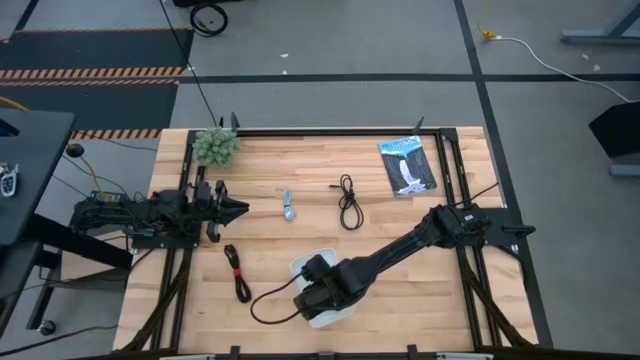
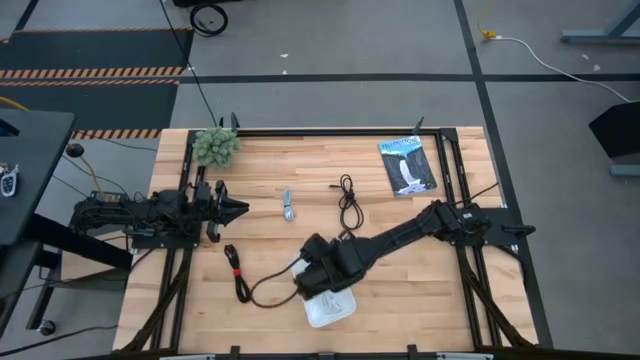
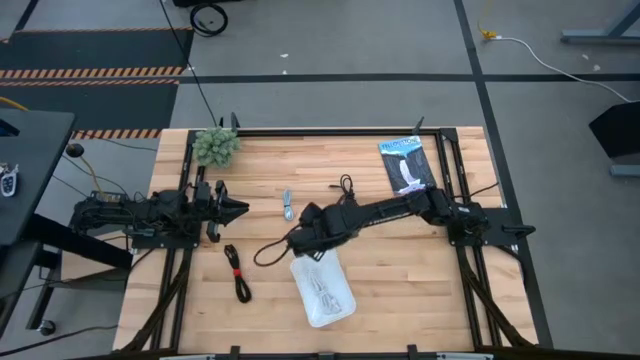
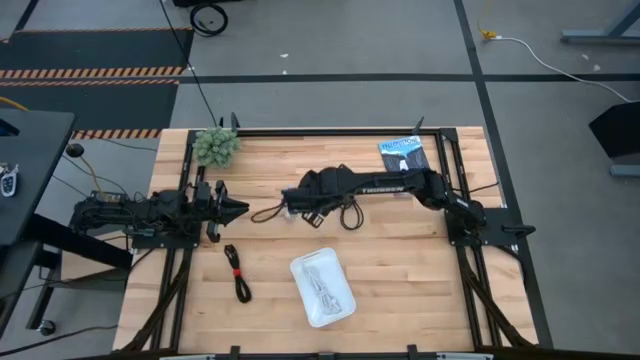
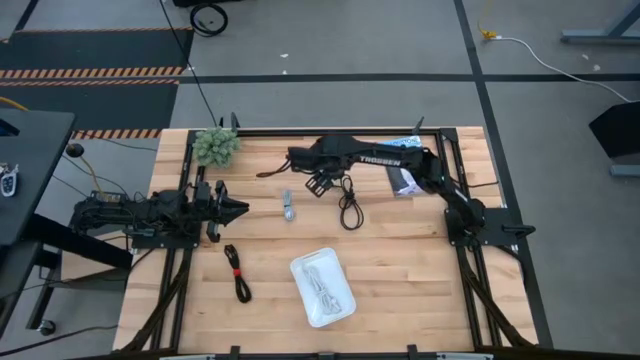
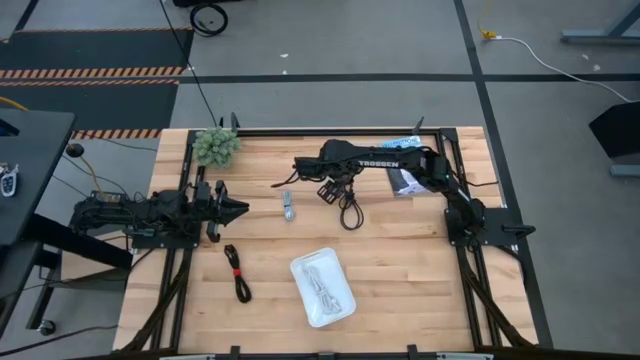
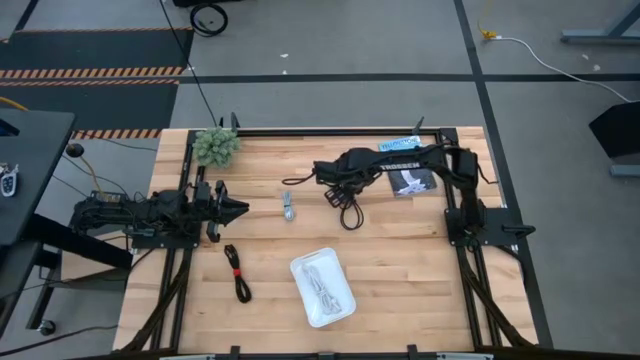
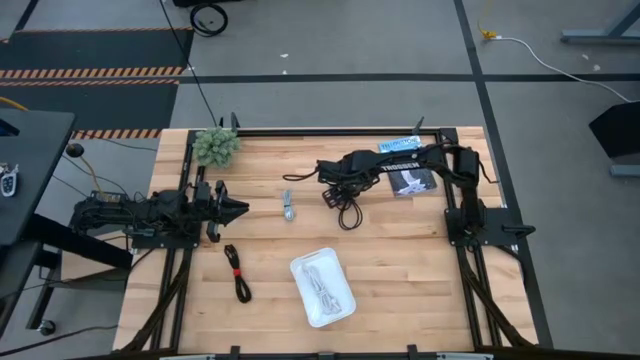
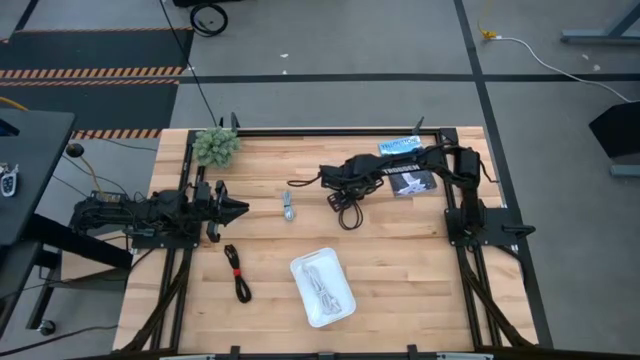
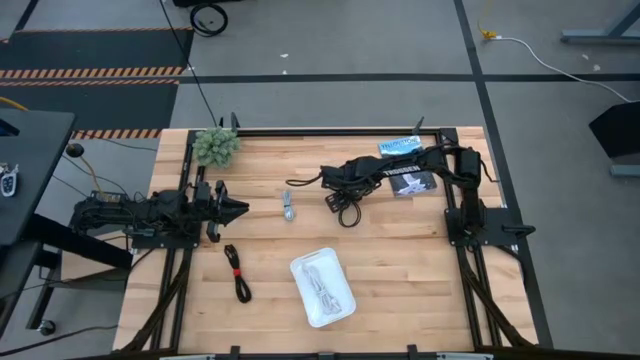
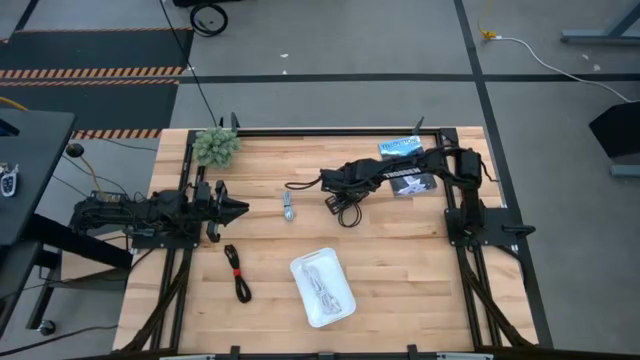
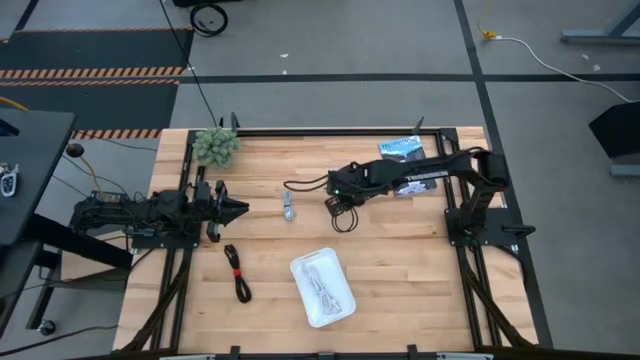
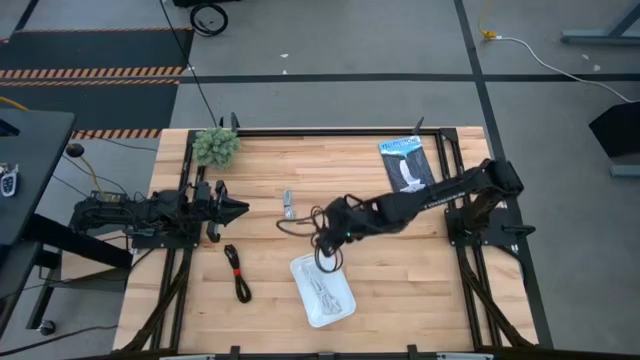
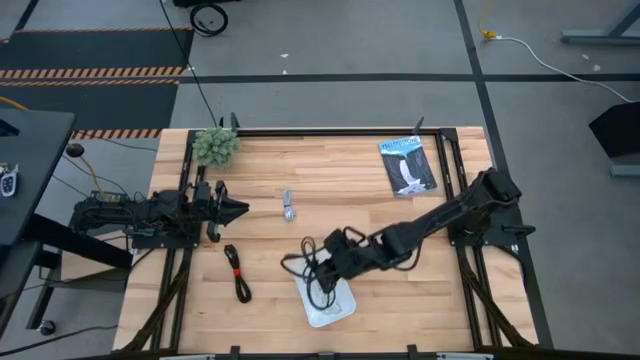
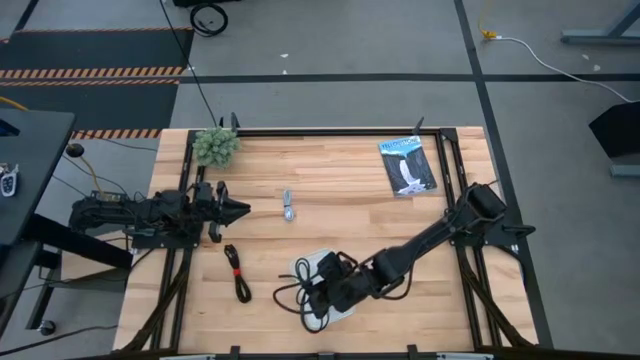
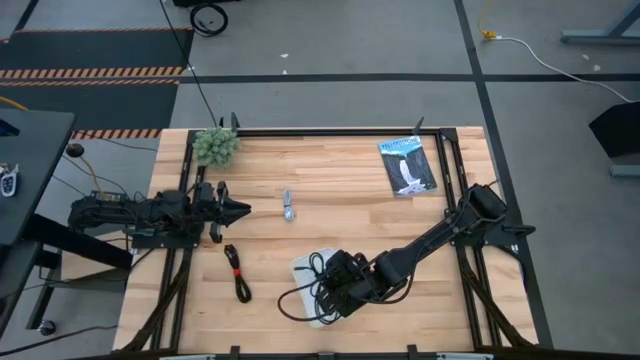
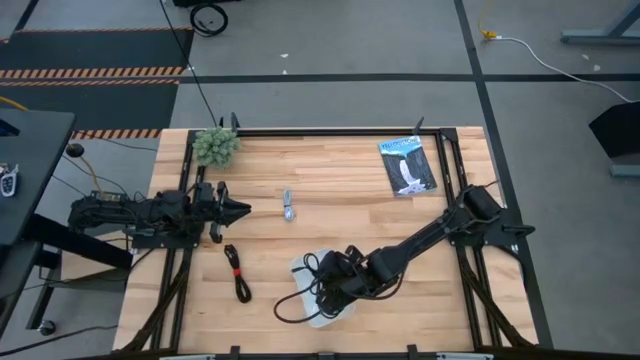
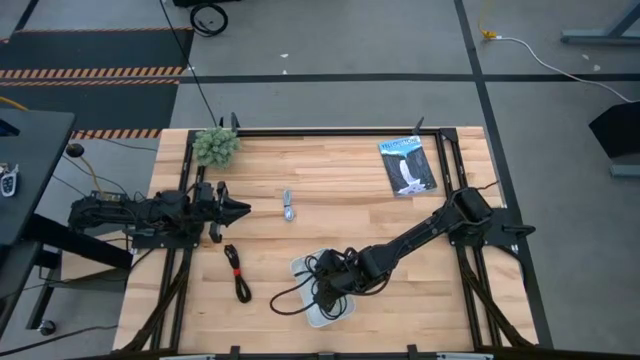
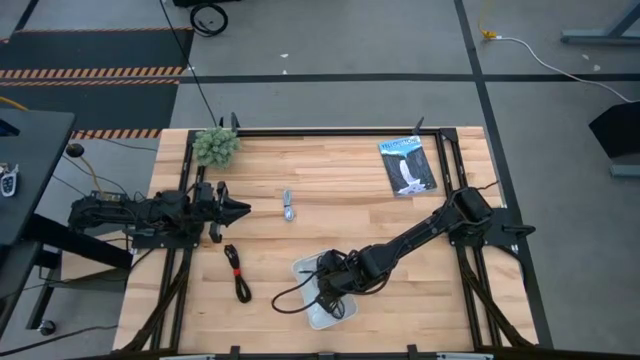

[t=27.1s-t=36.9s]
Task: Pick and place USB-C Cables
Put the right black charger cable into the white bin

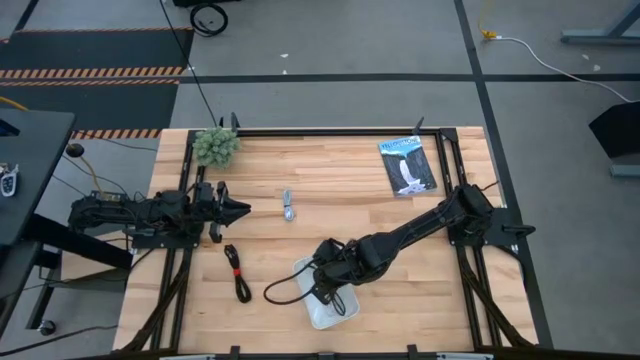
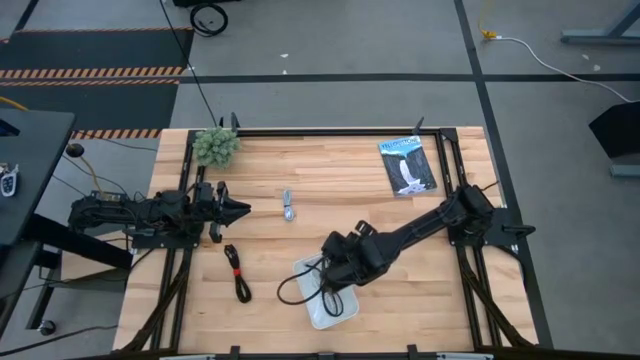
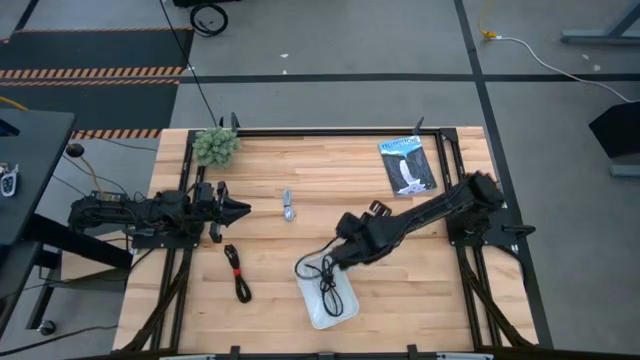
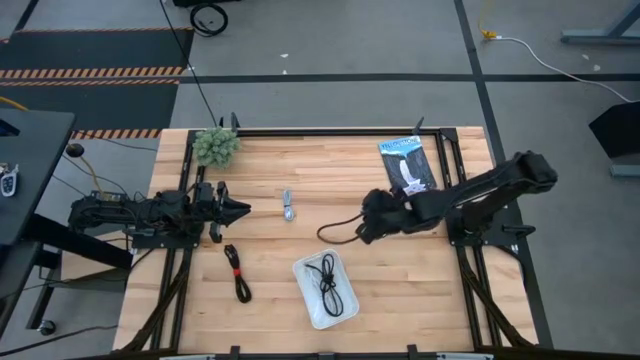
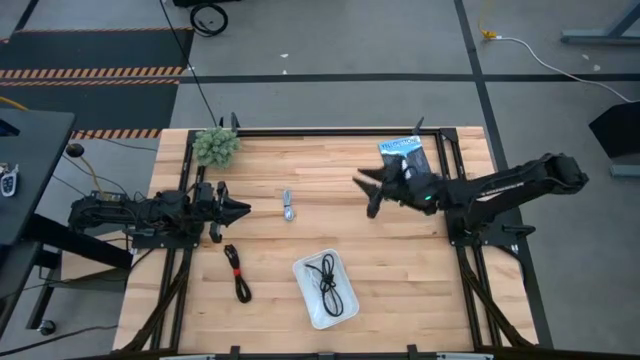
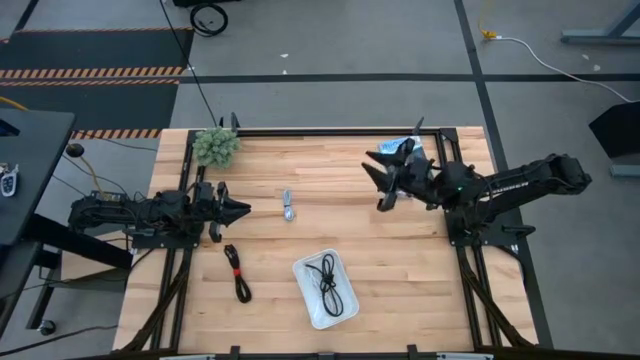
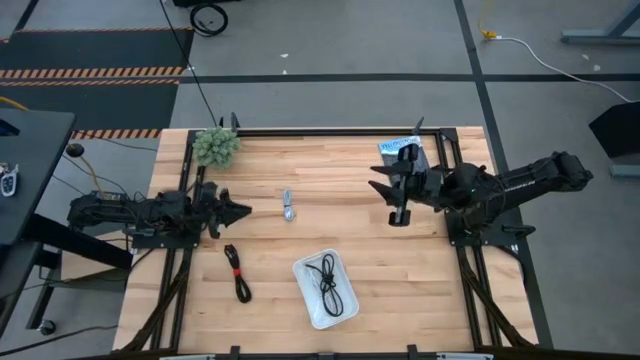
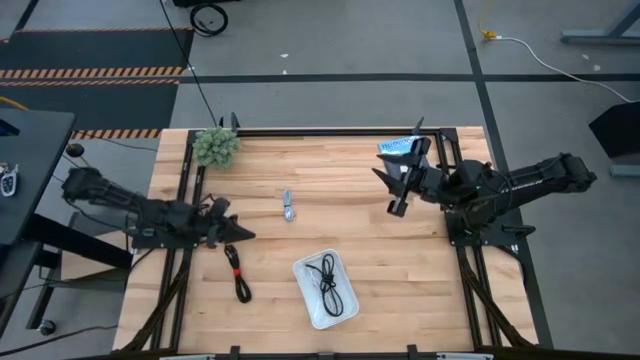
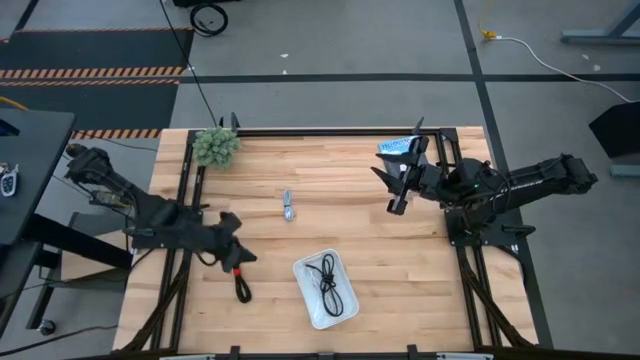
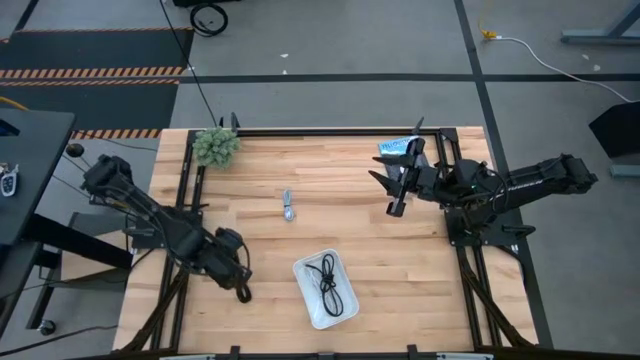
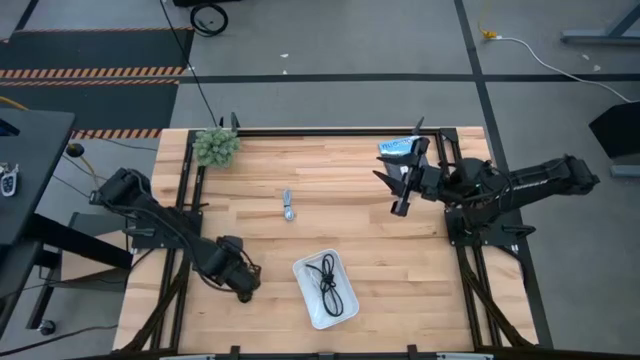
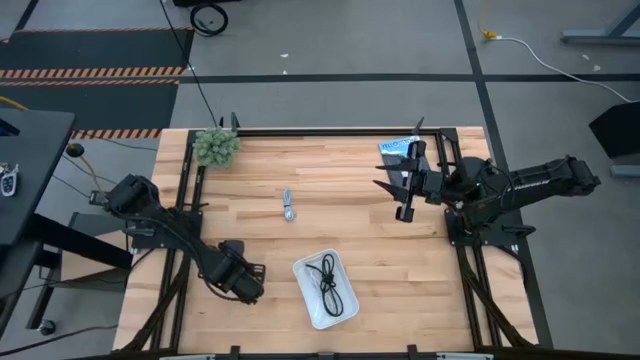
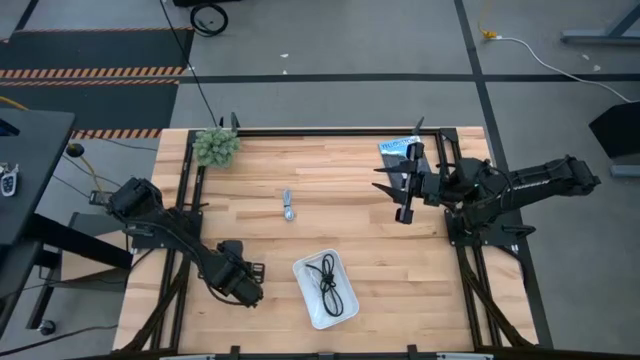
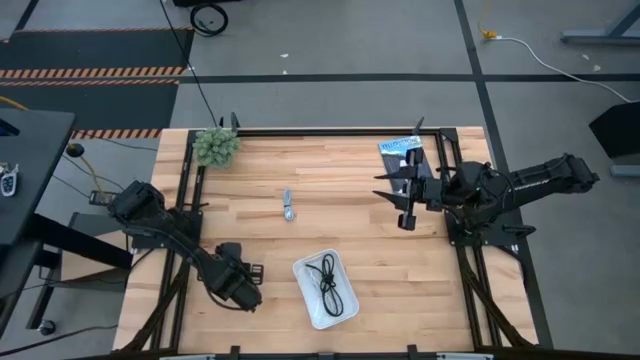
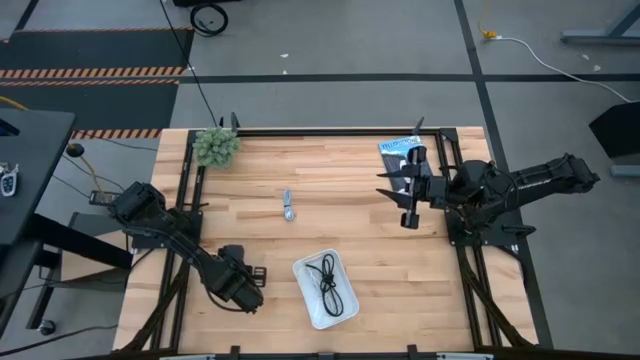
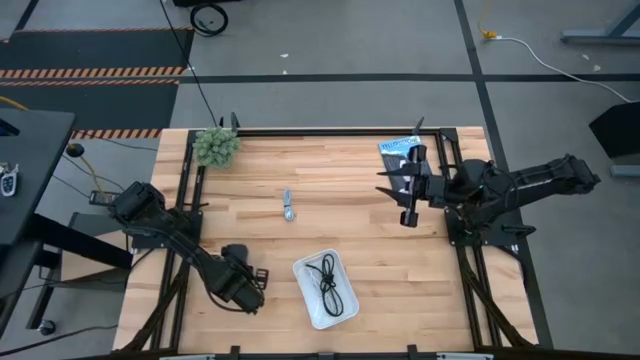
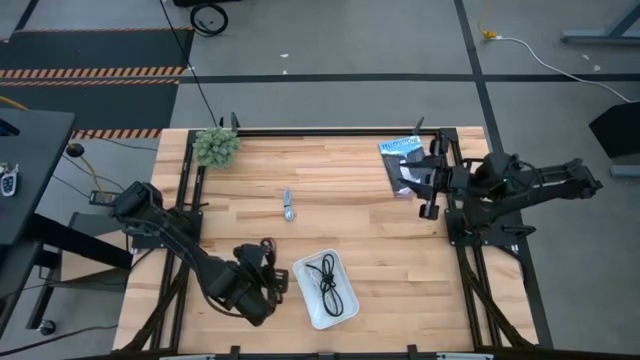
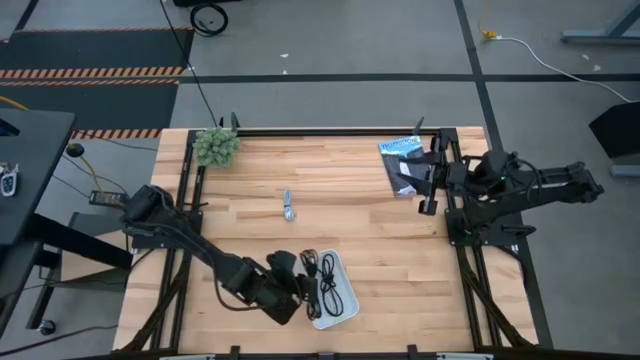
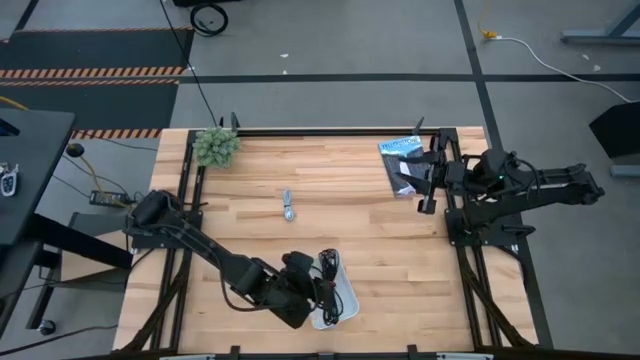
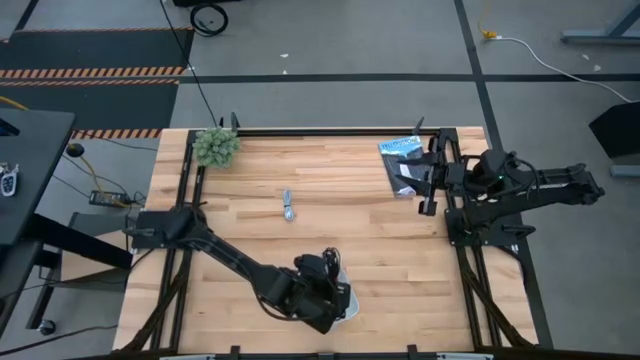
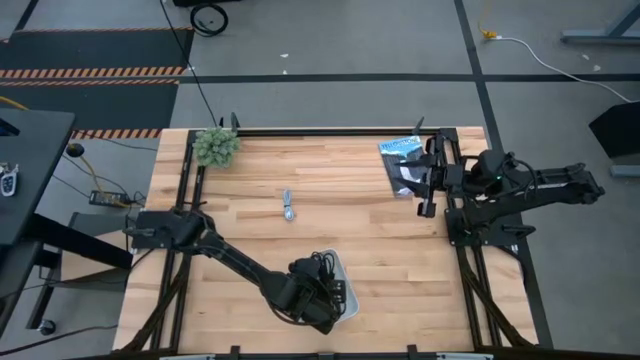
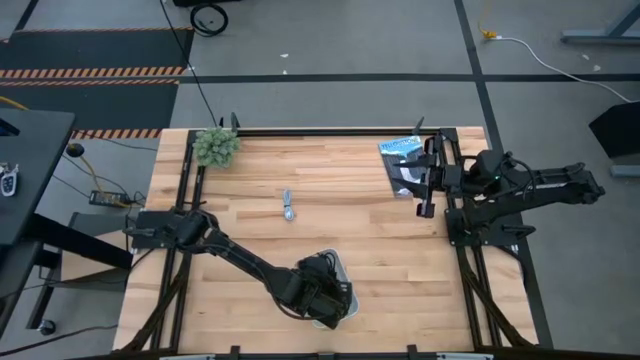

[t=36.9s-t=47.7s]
Put the black charger cable into the white bin
